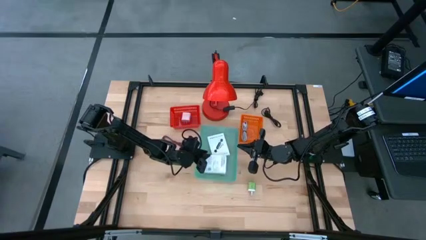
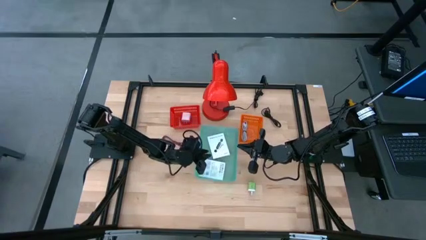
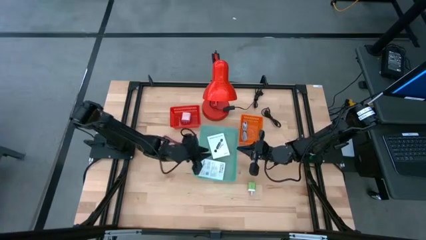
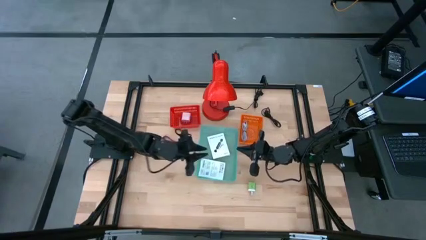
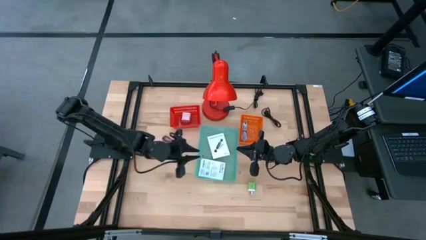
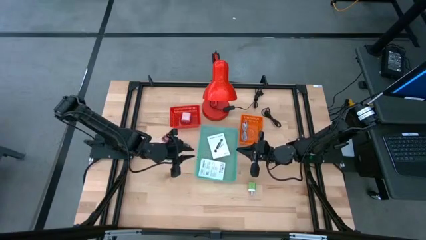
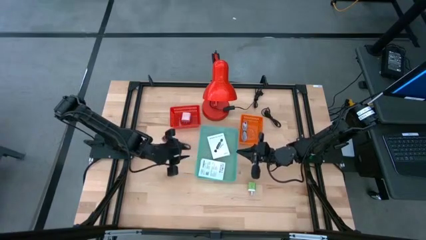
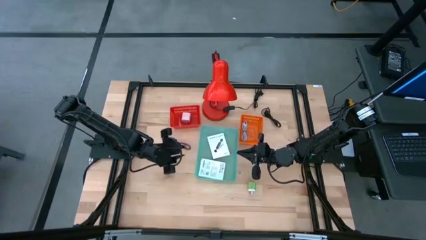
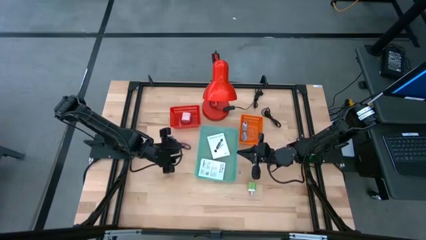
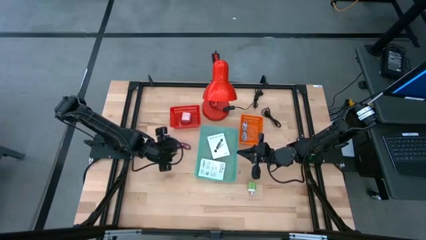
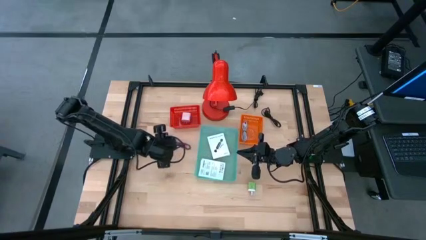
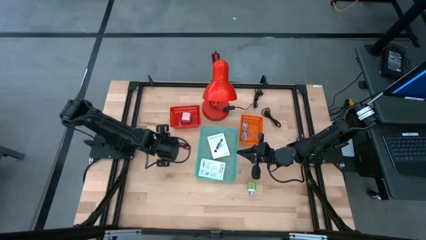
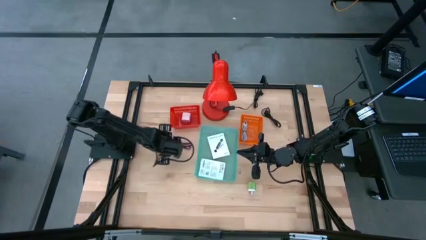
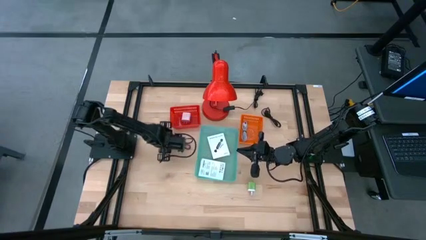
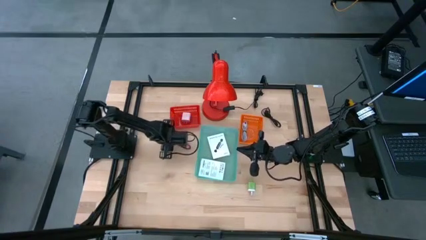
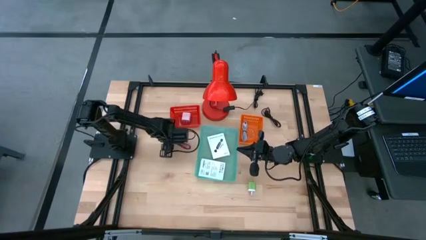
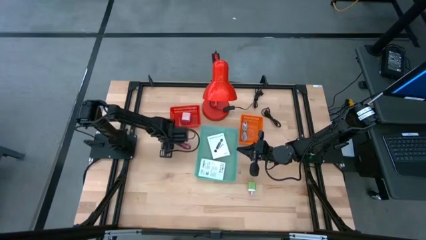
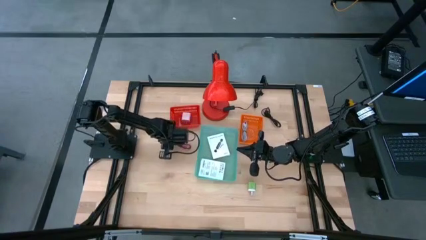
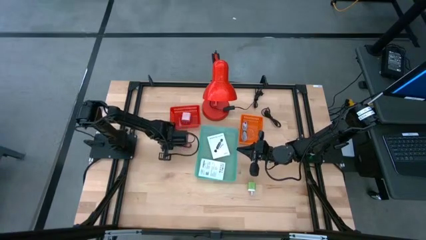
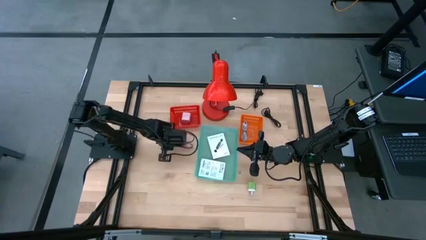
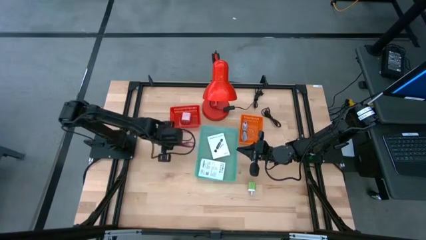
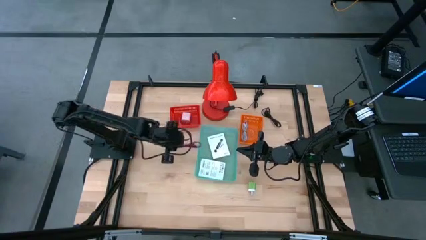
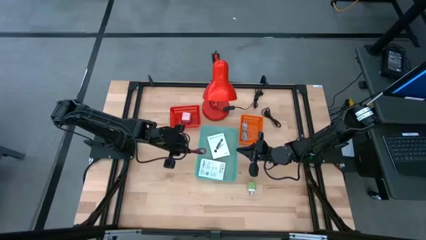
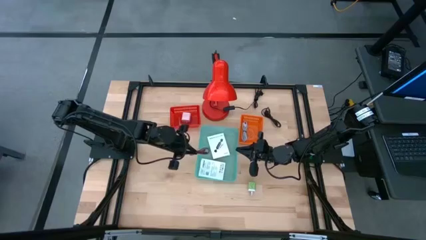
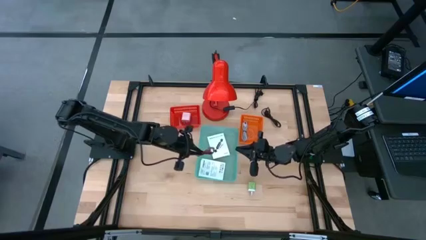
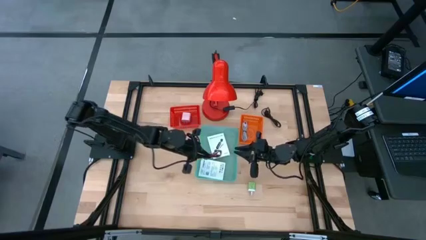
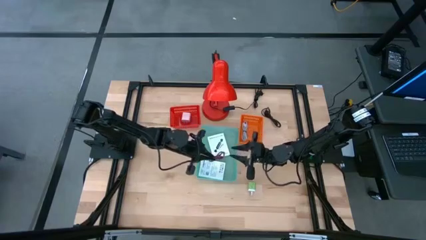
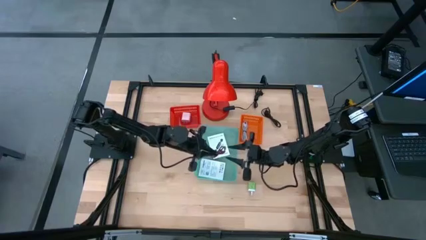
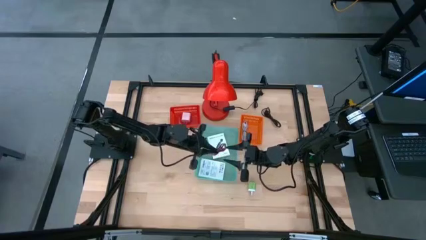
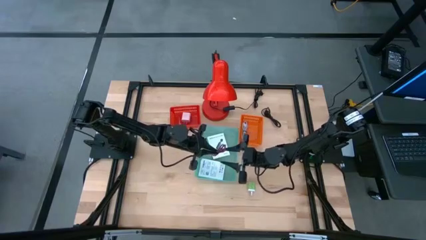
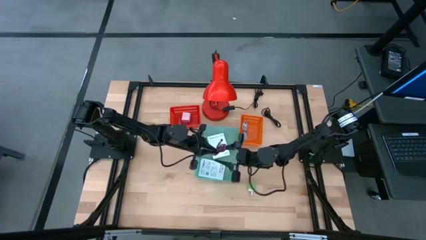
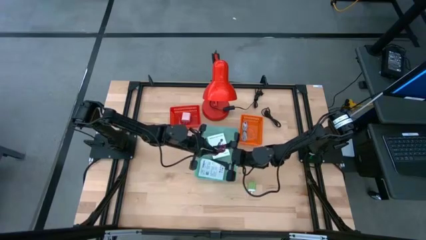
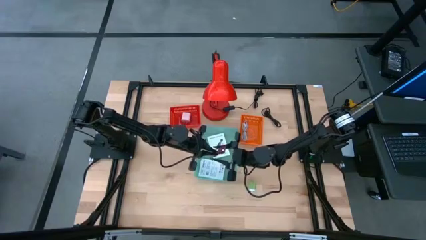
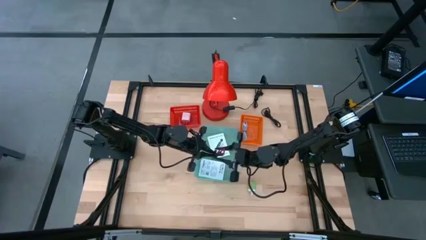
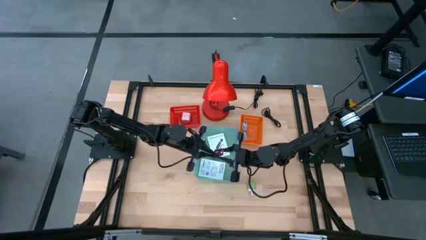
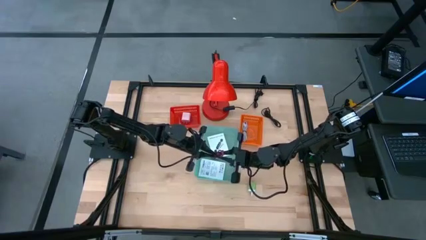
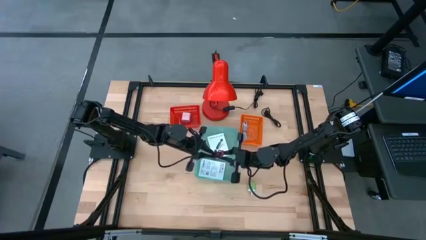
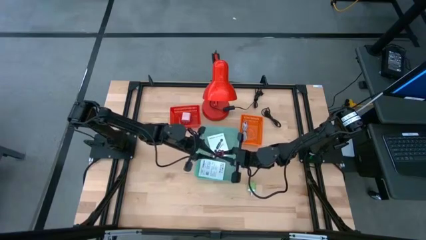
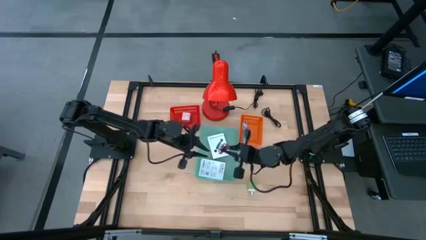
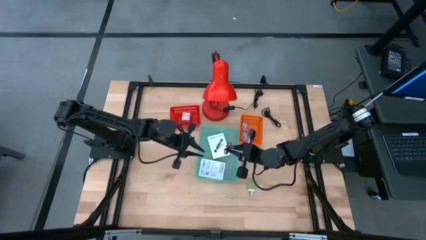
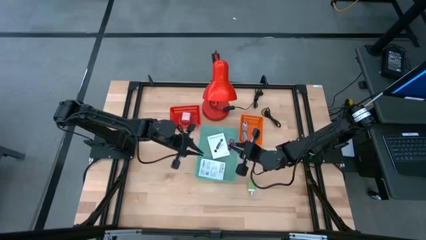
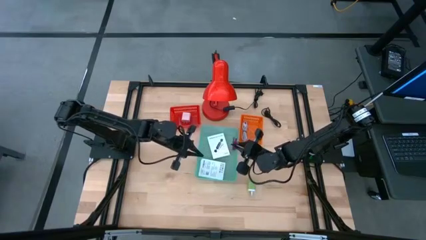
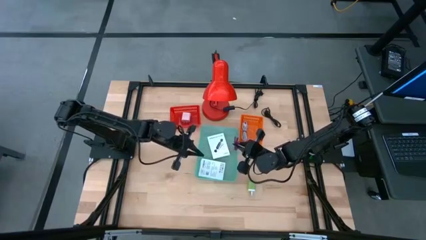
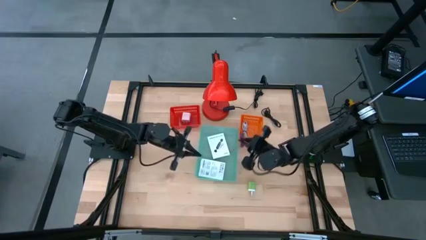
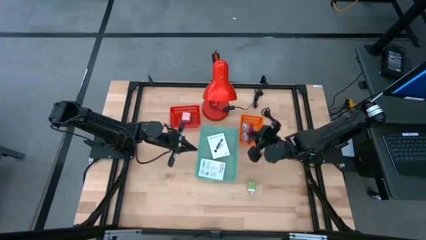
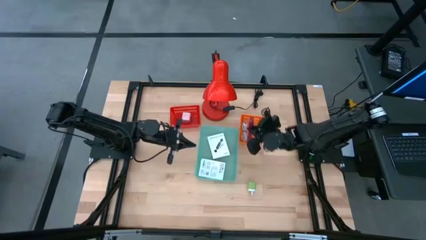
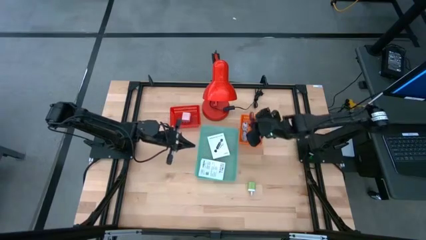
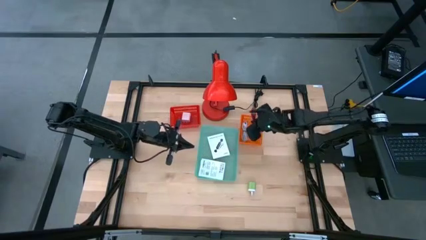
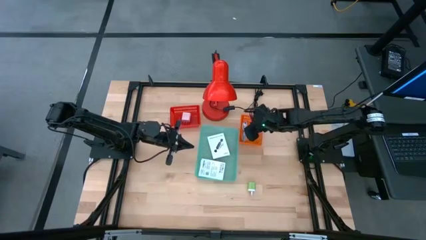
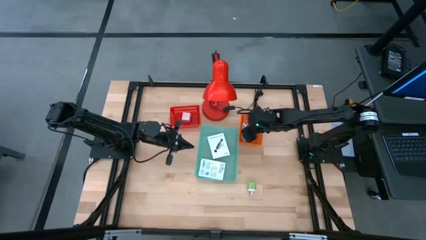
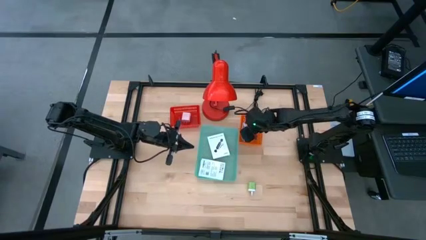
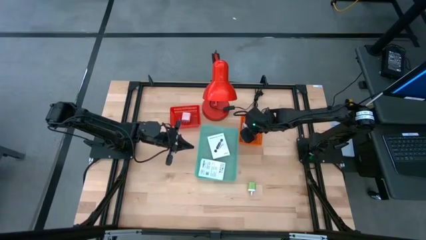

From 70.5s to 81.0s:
Task: Pick and place items into bin
Put the pink USB cable into the orange basket

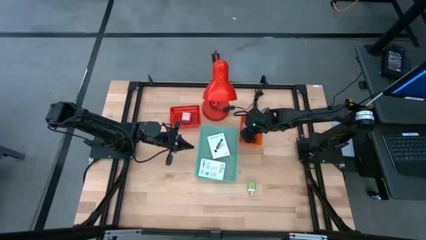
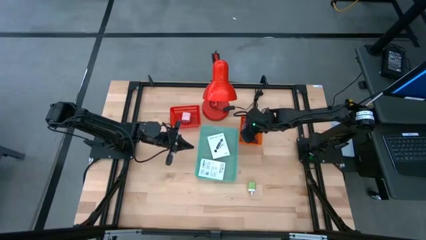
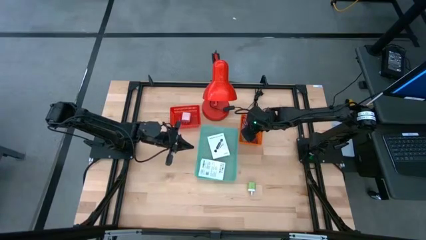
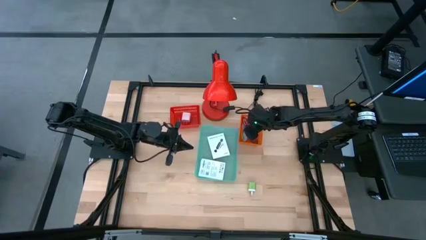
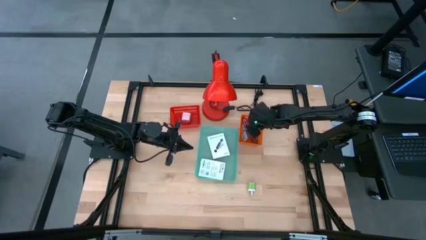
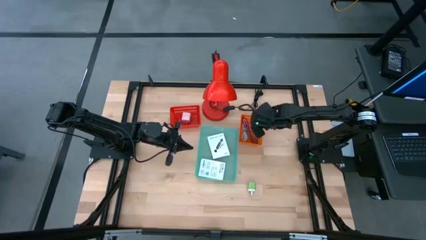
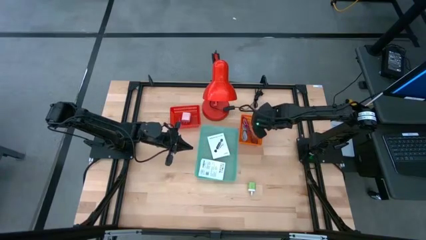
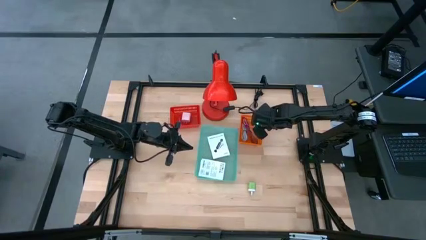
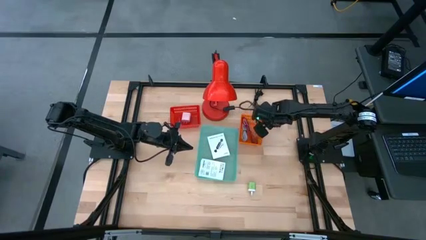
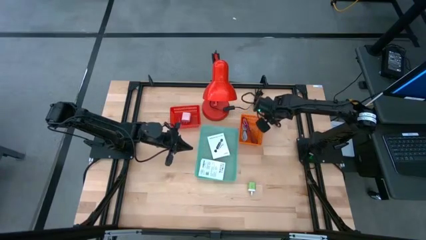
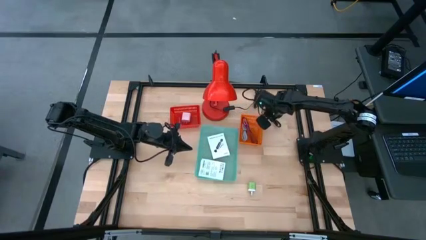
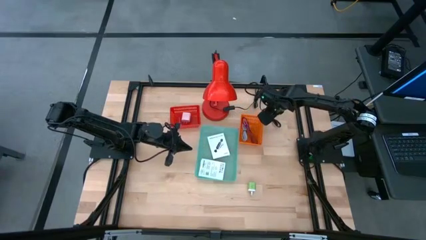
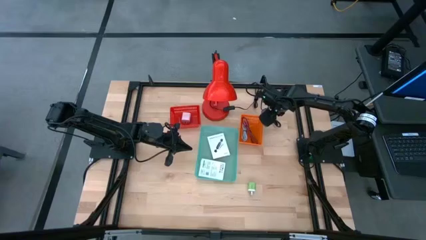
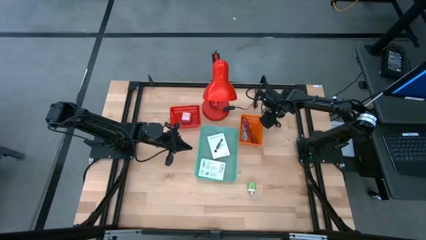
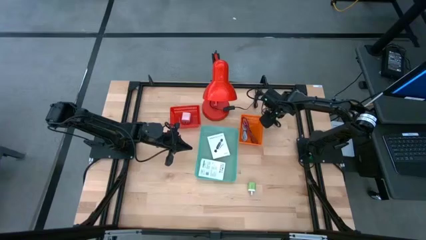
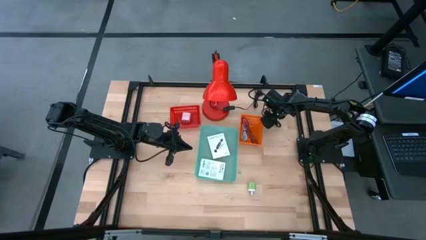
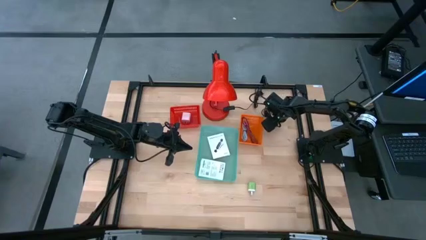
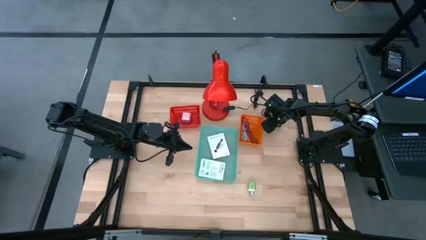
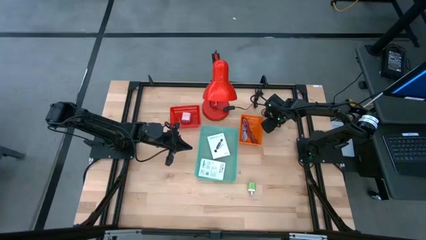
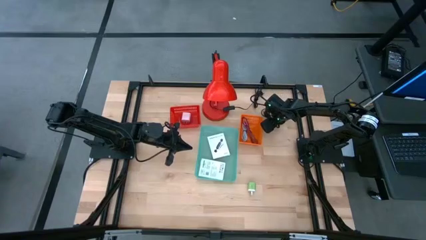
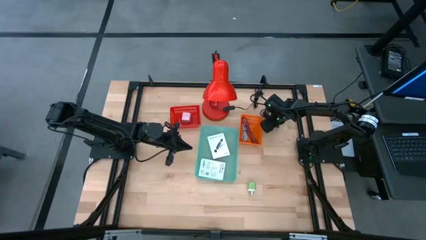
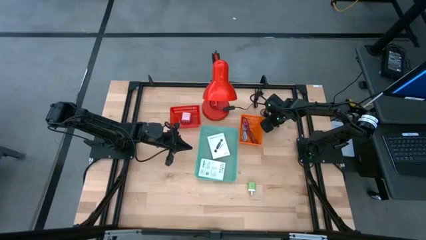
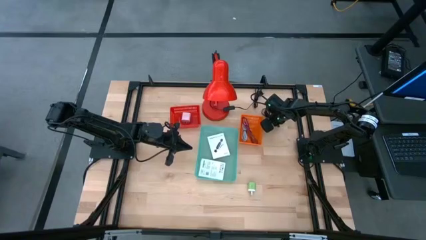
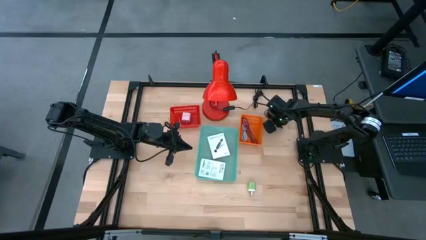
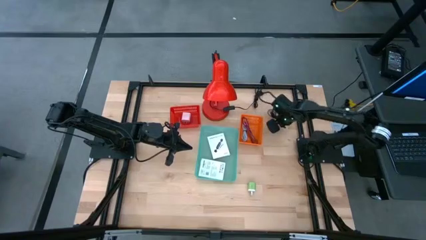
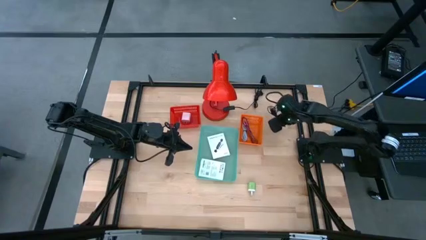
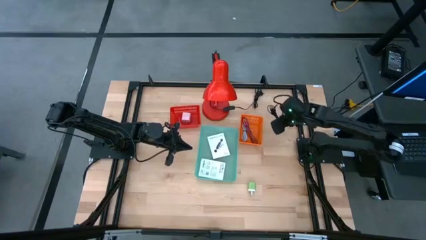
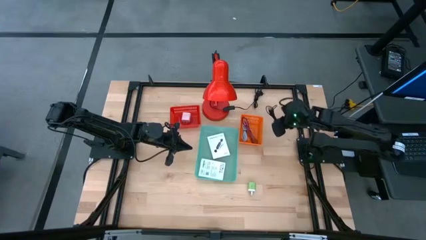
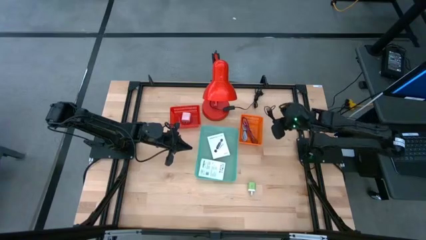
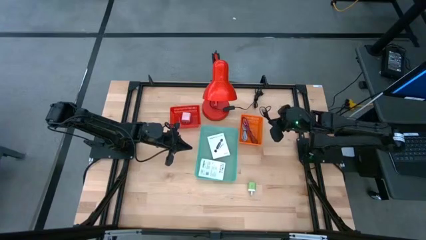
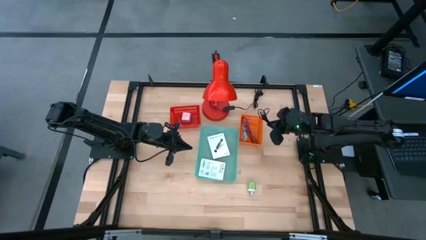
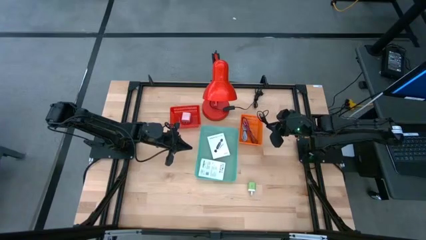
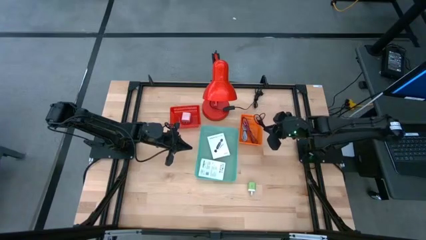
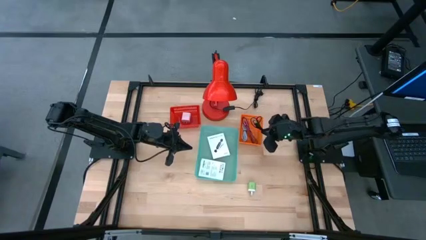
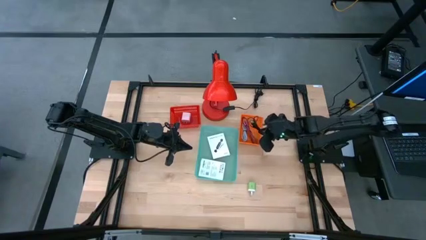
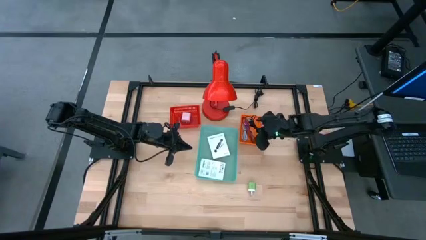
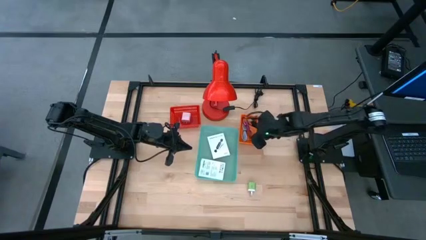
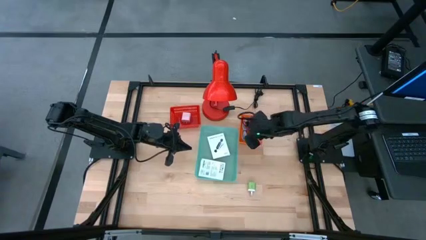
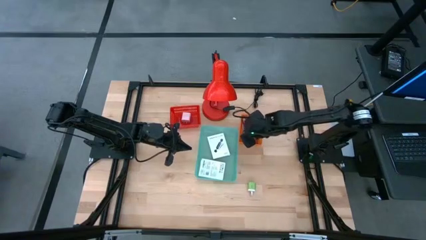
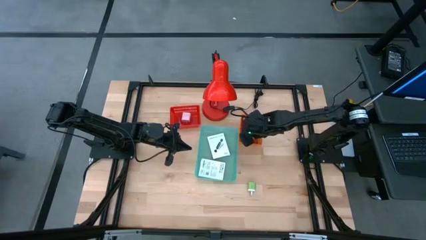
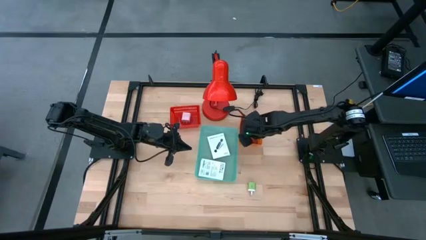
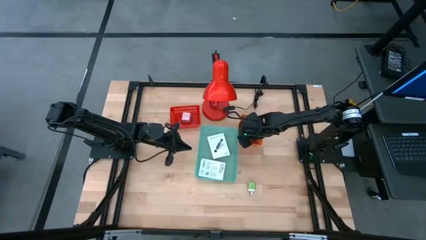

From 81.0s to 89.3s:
Put the black USB cable into the orange basket
